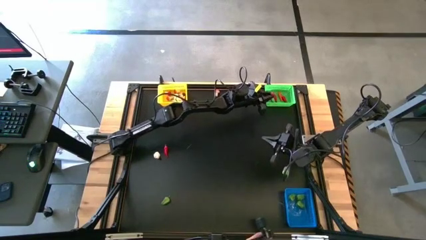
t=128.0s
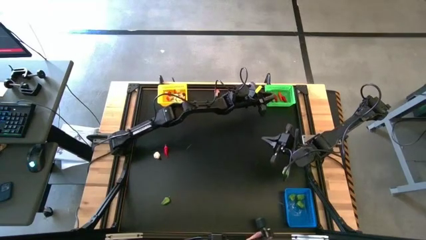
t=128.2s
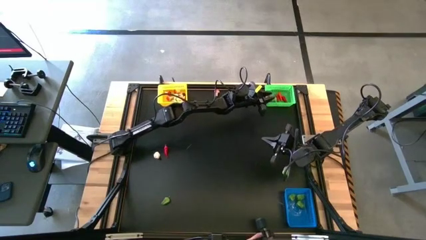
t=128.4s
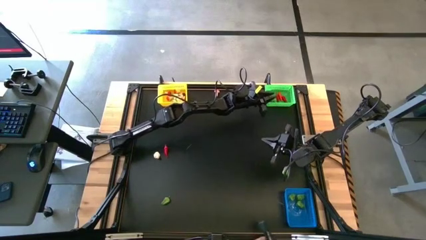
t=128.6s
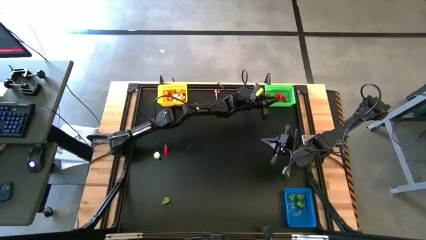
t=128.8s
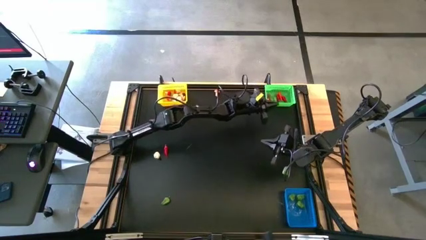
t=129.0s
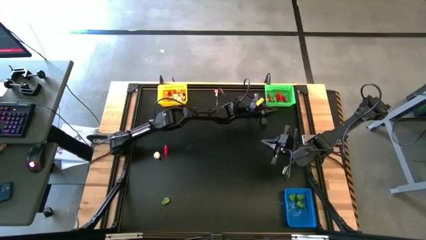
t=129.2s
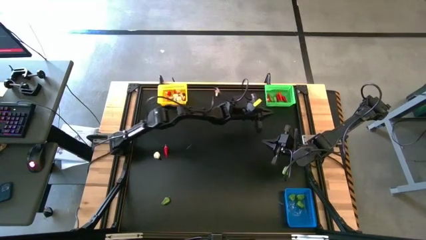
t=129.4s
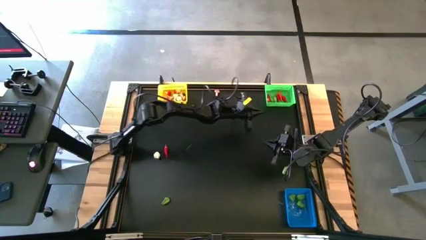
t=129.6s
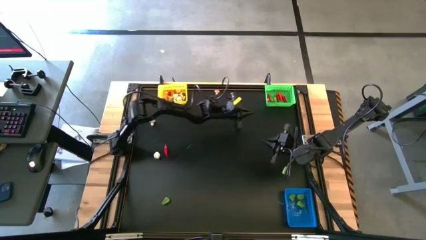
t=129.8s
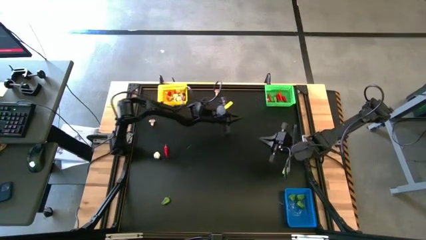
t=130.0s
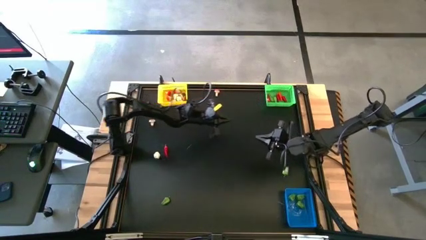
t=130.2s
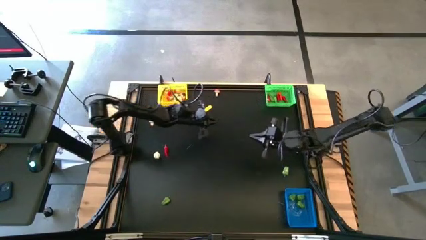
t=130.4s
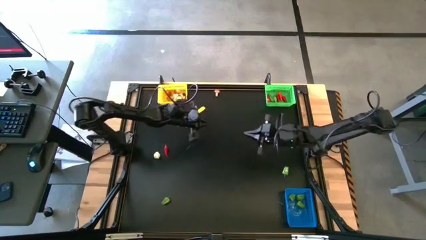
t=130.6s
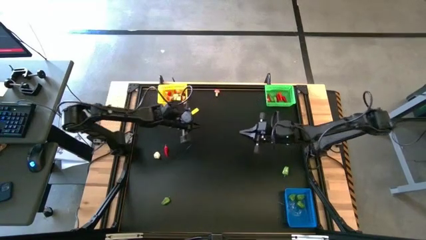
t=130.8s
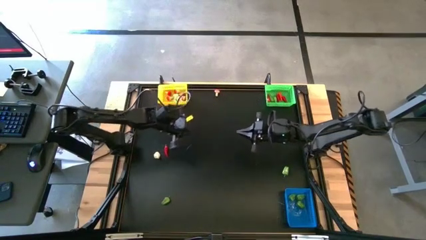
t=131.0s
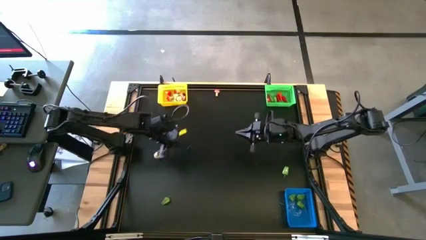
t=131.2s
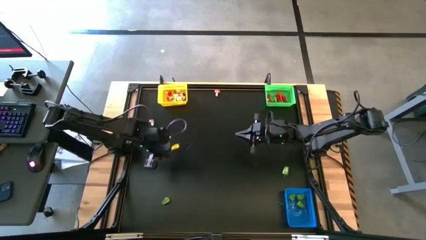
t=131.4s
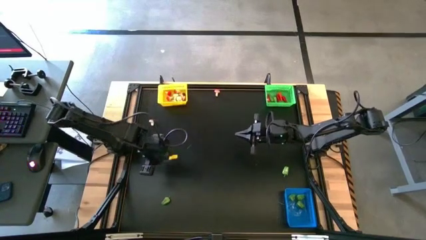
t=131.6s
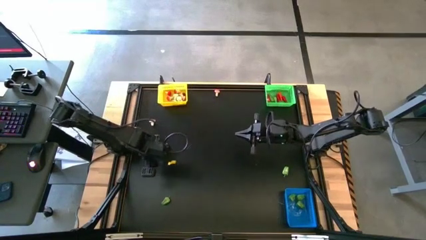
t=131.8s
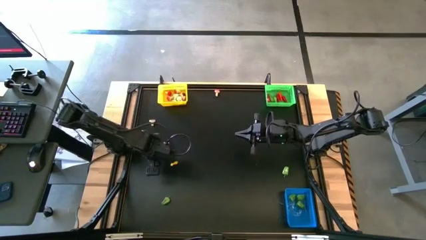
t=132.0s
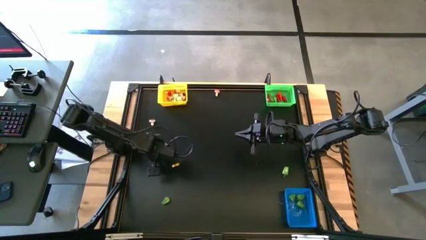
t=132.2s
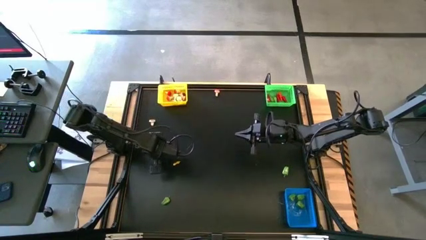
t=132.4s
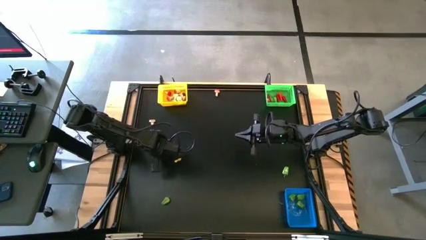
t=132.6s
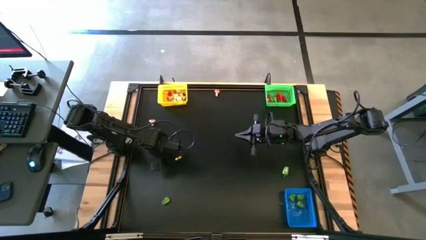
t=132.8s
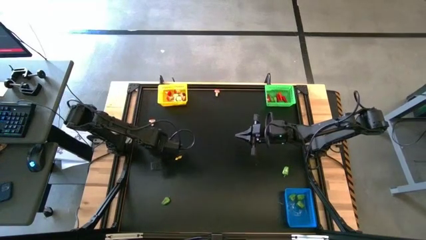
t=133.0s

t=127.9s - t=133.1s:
Task: Sort produce into baskets
Put the green mushroom into the yellow bin

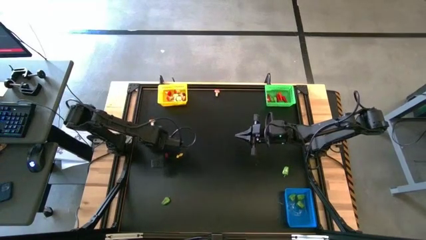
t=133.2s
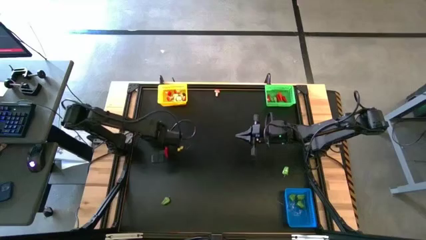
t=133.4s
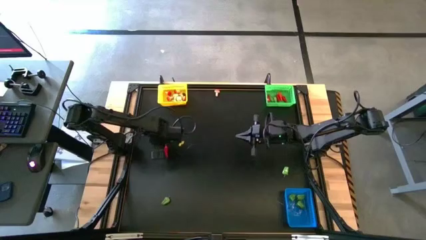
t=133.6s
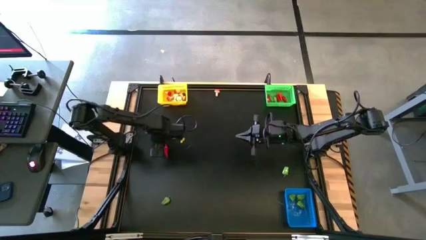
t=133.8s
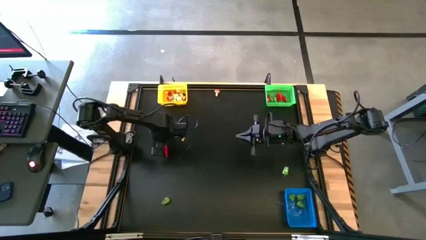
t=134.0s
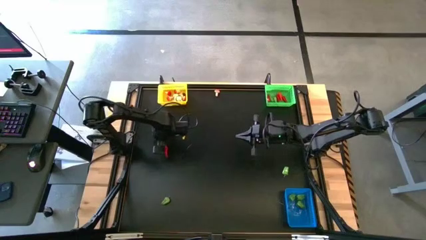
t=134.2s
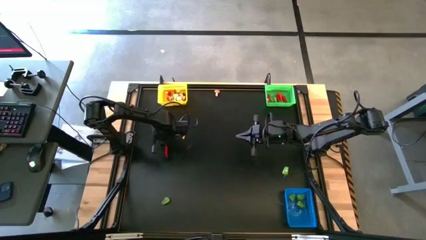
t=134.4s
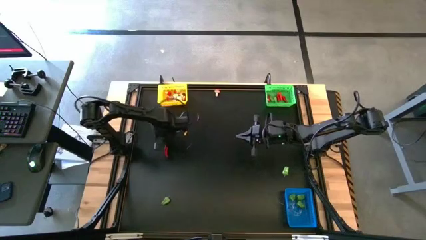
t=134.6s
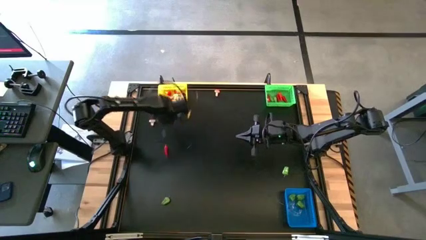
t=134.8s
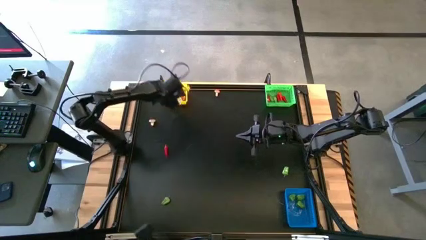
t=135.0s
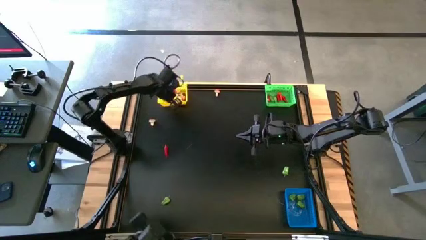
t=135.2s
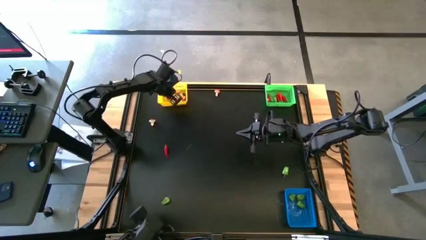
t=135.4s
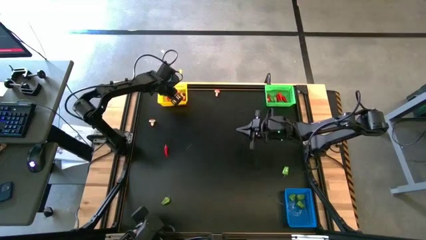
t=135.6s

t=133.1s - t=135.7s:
Put the green mushroom into the yellow bin

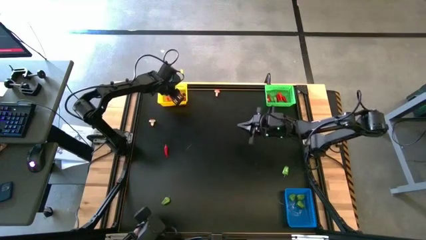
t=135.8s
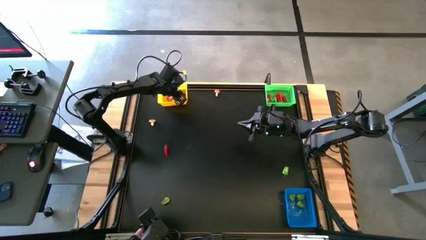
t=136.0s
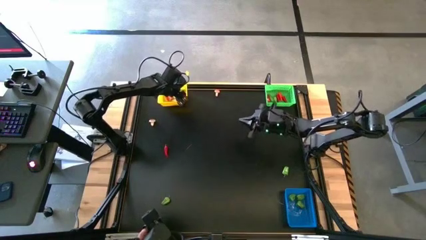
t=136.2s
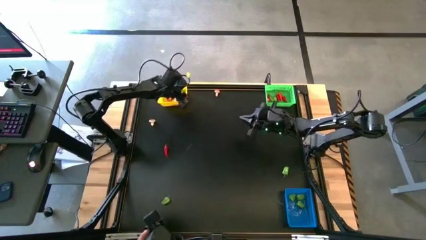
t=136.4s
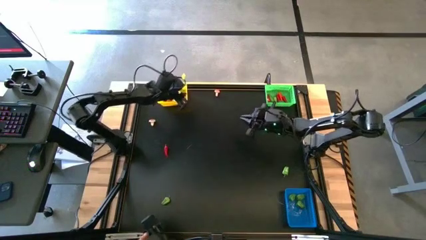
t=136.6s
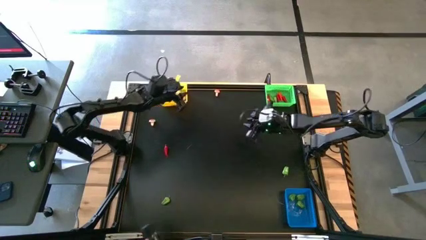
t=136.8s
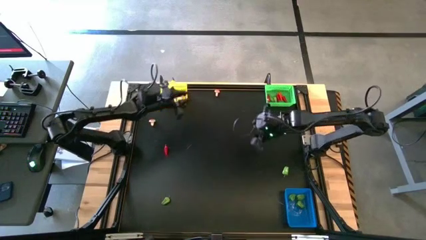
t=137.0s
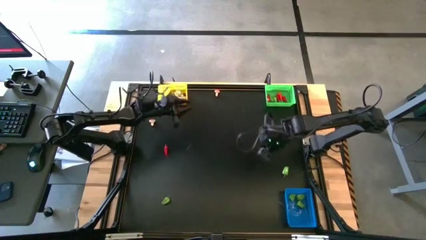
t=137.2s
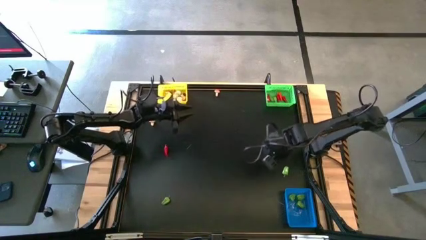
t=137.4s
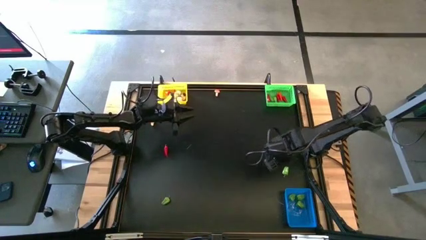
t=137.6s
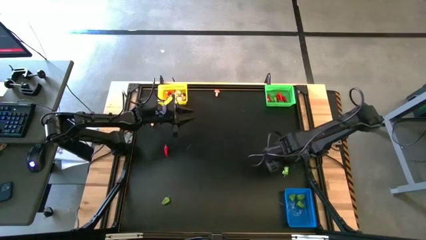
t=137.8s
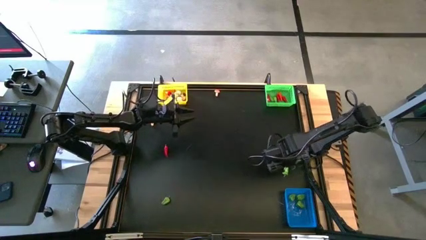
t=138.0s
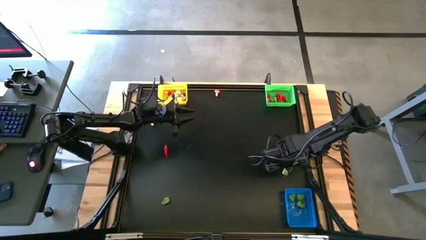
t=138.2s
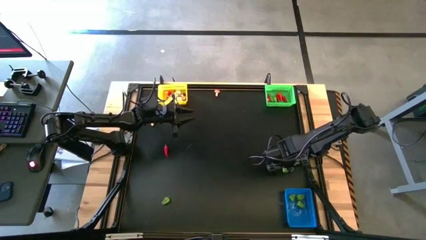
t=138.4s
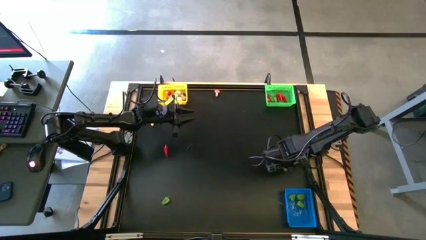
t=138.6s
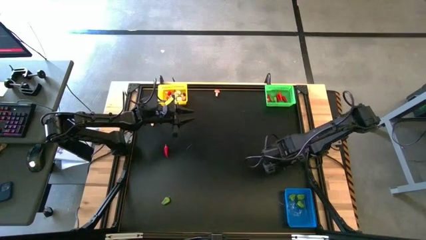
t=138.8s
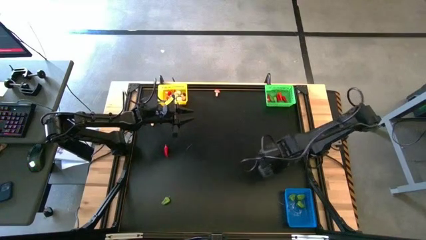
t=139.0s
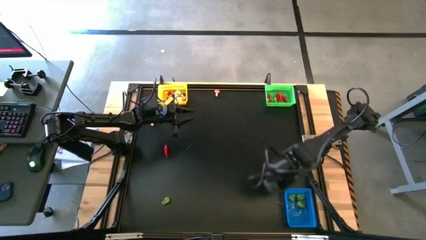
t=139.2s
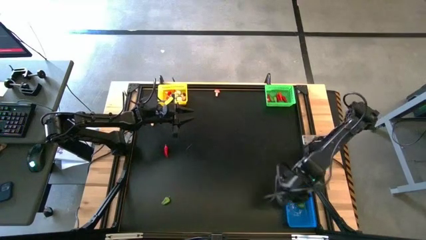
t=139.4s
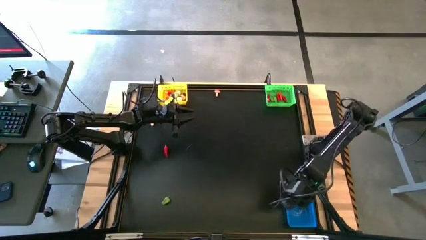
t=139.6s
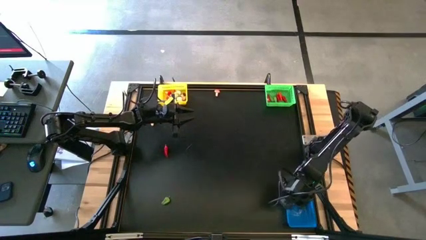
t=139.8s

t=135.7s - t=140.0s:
Put the green bell pepper into the blue bin

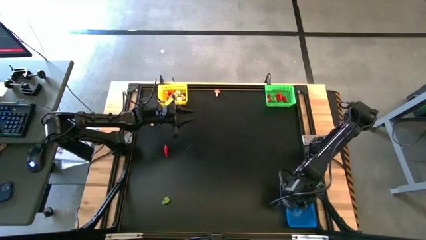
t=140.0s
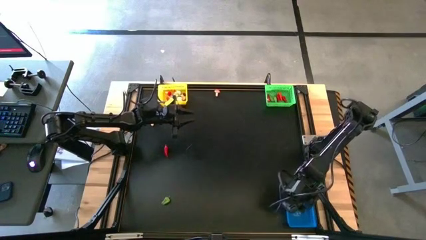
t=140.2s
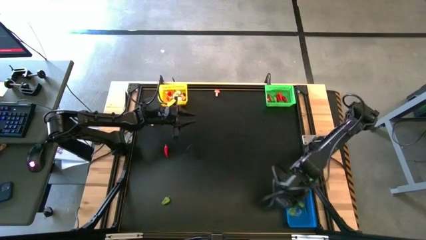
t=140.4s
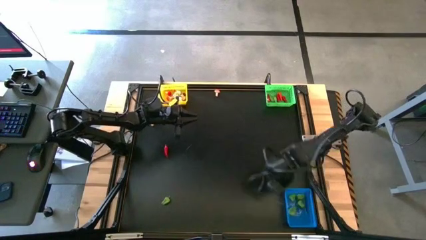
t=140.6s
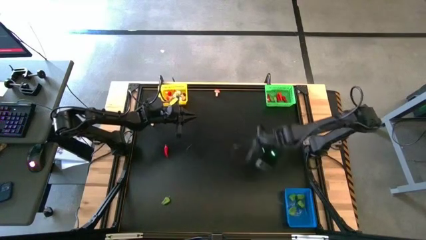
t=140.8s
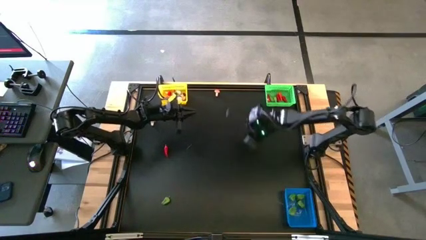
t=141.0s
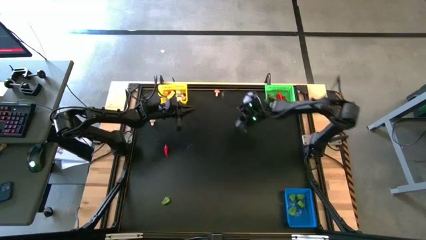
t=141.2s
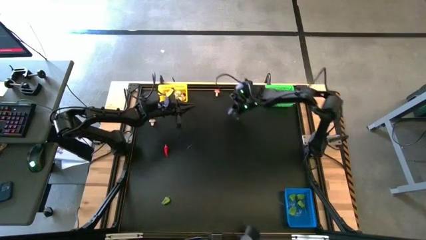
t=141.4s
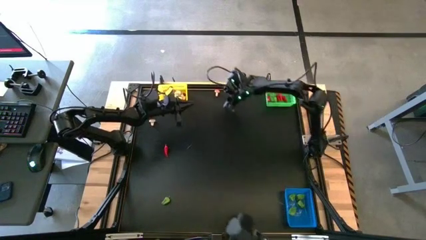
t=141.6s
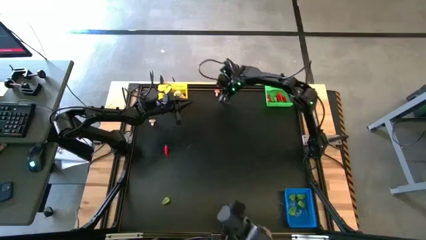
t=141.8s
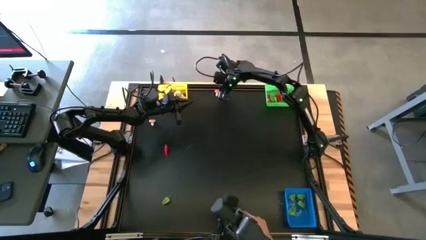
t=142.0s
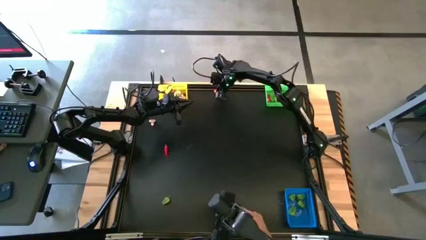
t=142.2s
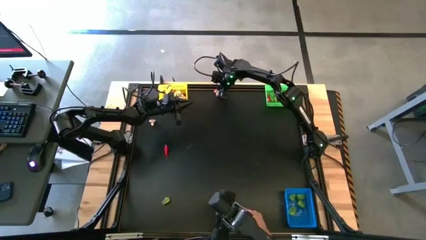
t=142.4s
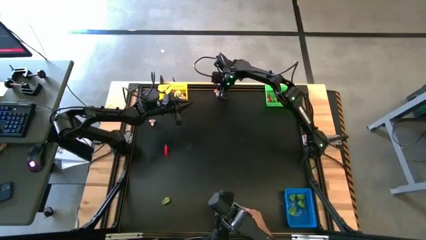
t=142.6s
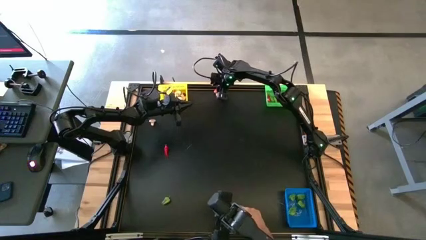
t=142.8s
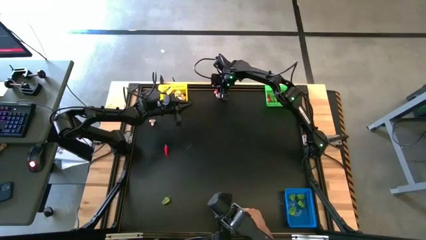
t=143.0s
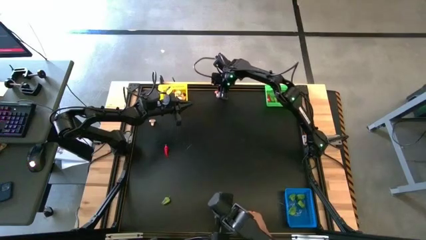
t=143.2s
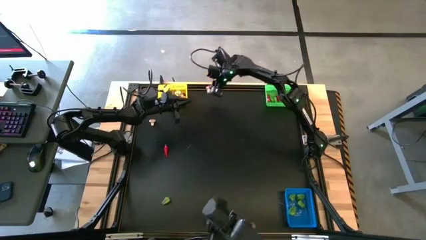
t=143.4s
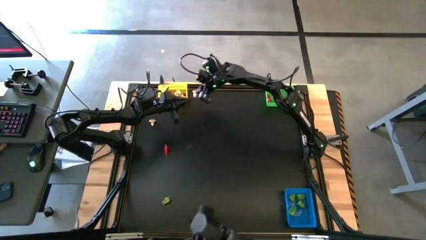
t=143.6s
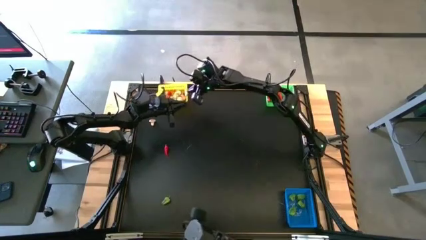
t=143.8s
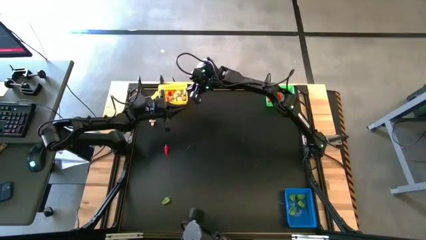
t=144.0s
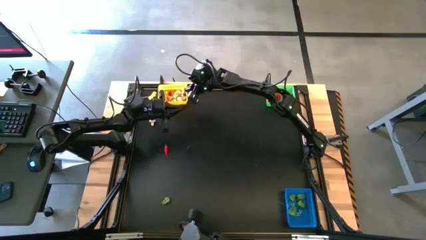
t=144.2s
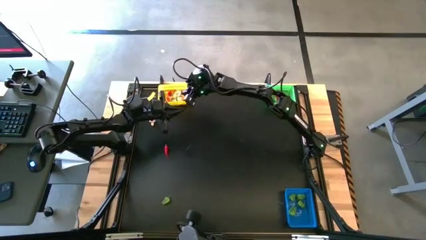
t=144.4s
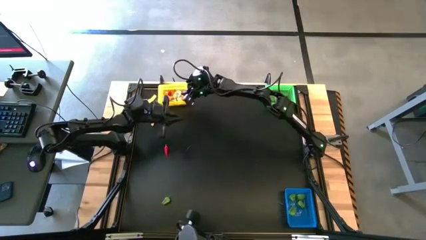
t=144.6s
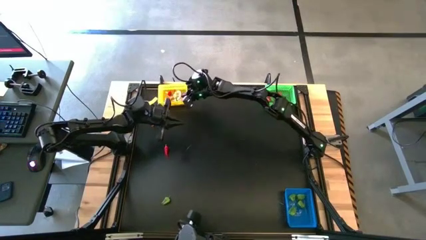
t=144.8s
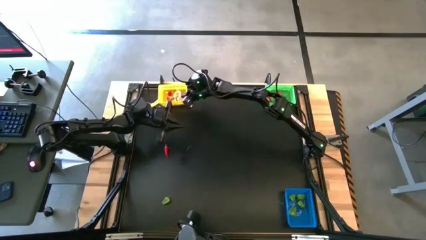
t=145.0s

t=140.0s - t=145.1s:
Put the brown mushroom into the yellow bin
